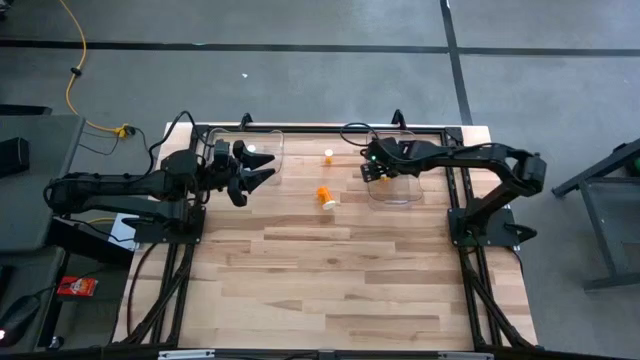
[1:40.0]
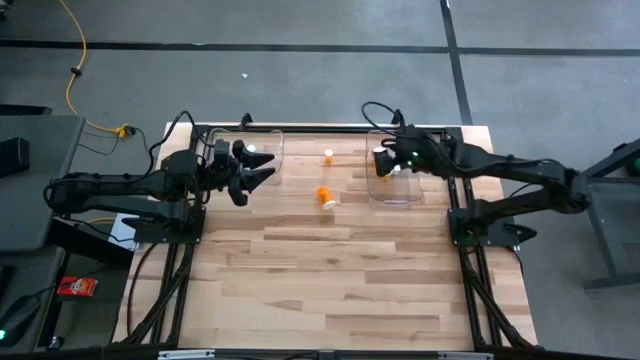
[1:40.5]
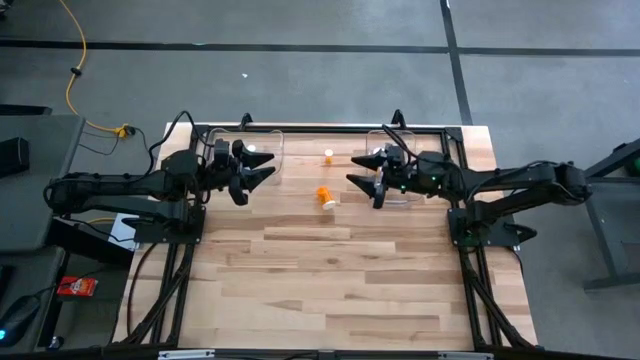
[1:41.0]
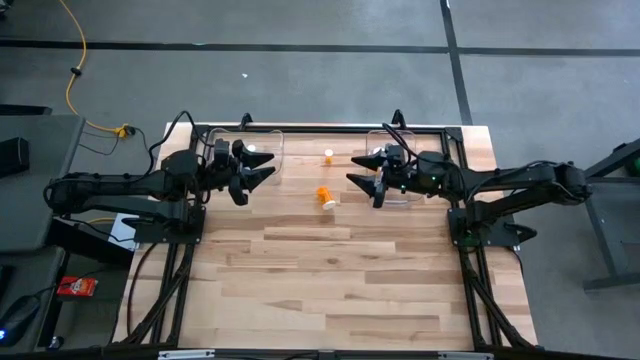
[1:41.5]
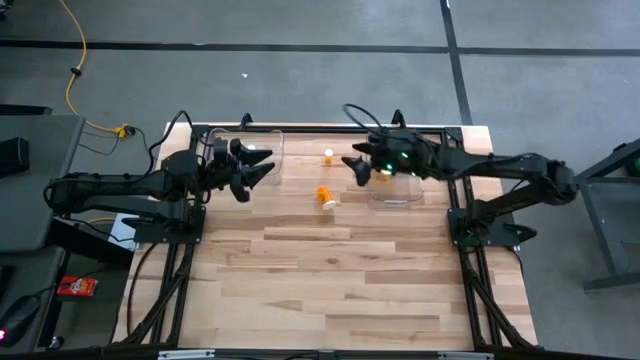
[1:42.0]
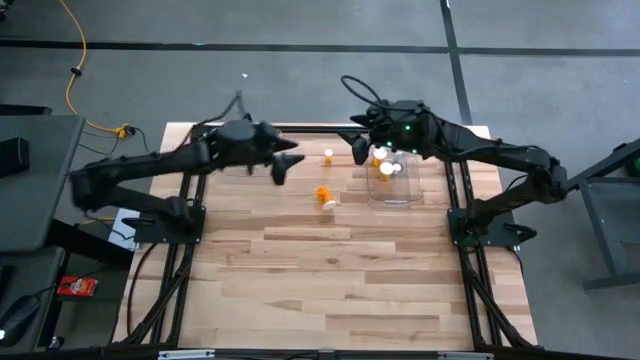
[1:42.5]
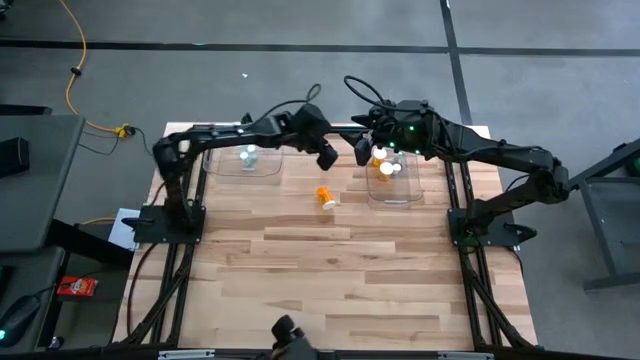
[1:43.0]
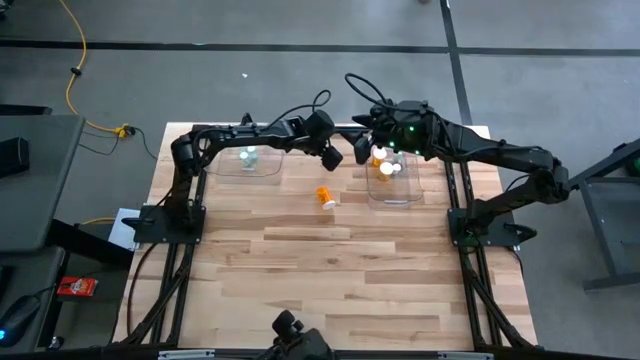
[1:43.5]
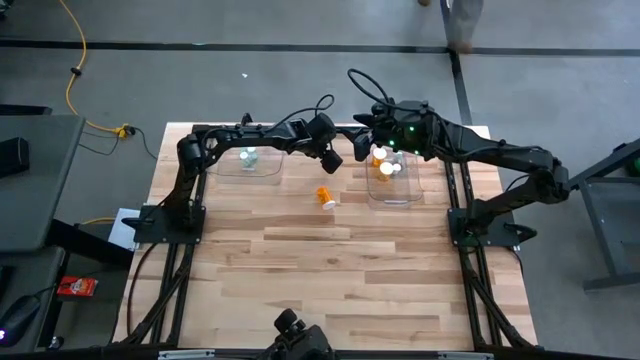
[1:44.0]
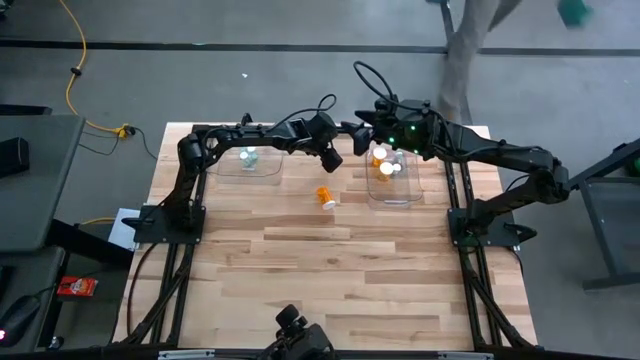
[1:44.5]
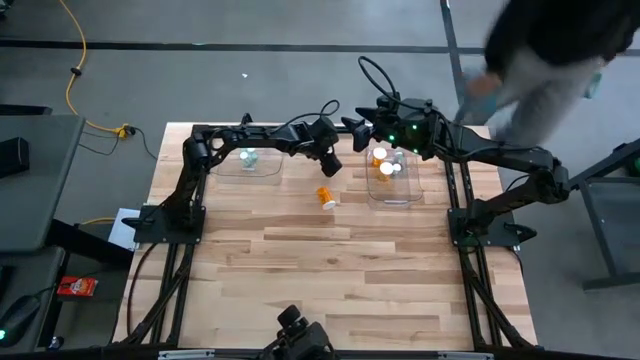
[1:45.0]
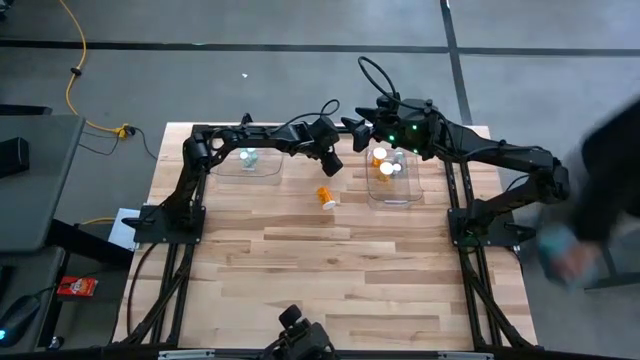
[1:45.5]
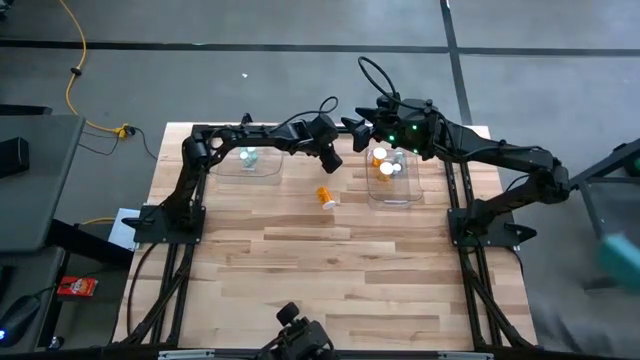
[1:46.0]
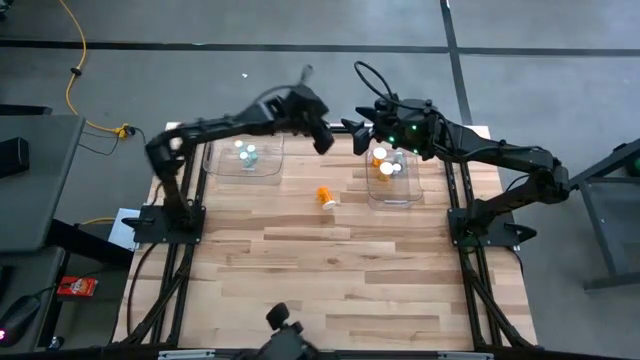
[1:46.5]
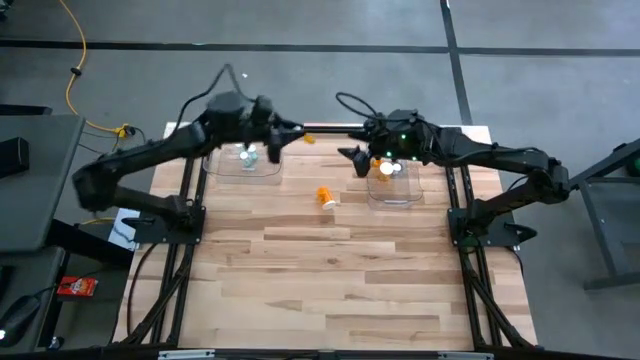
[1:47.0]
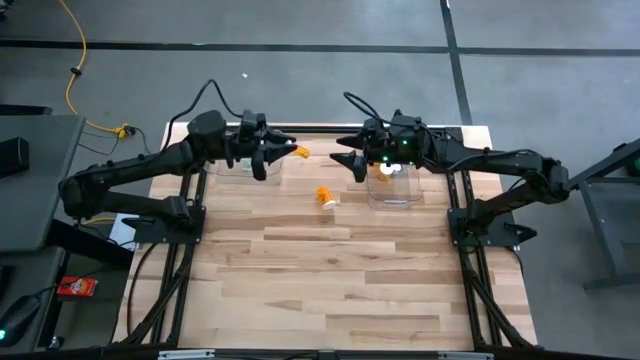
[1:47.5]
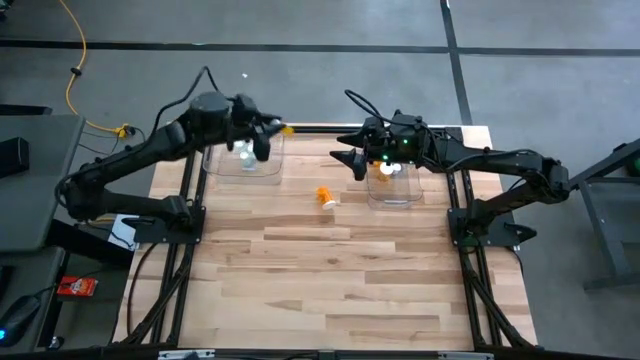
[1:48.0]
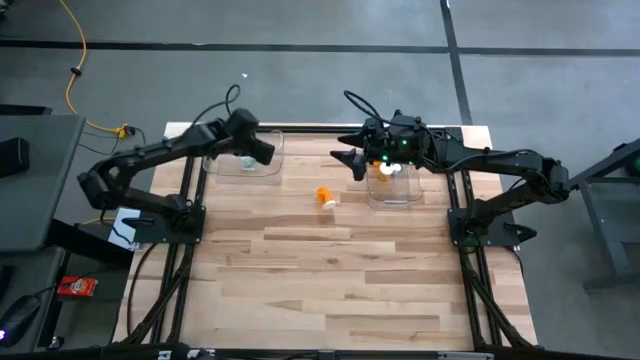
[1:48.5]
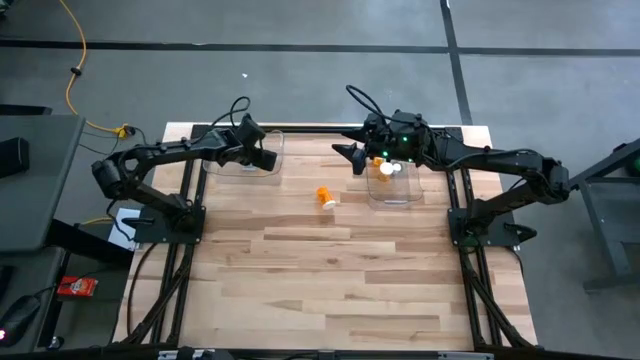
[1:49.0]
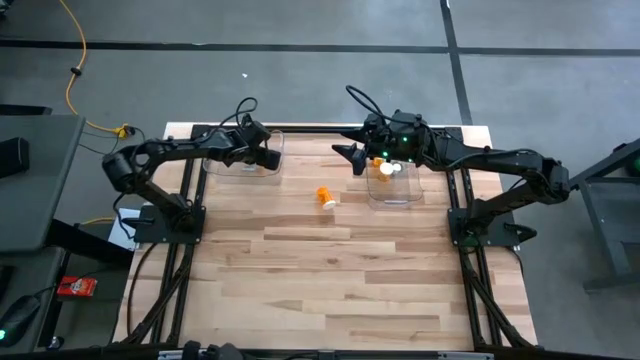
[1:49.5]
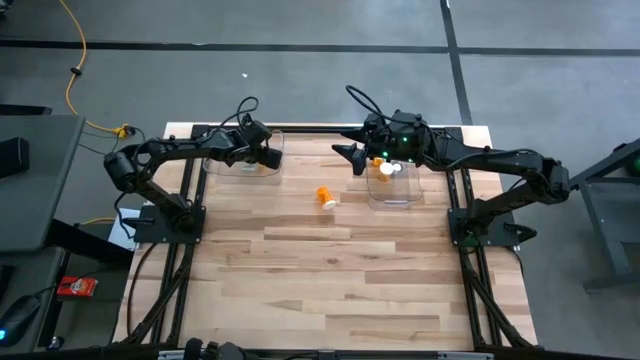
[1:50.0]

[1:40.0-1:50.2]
Task: Pick and place medicine bottles into bin by pill shape (circle, oval)
Put the orange tablet bottle into the left transparent bin

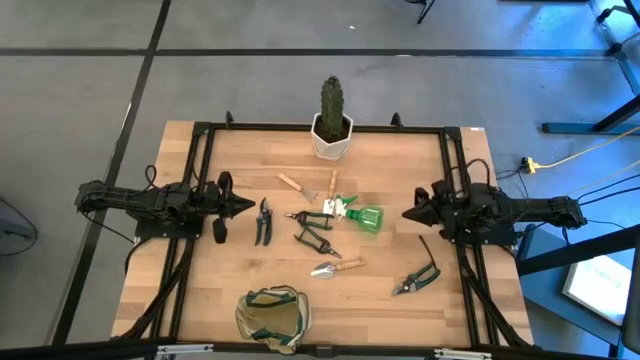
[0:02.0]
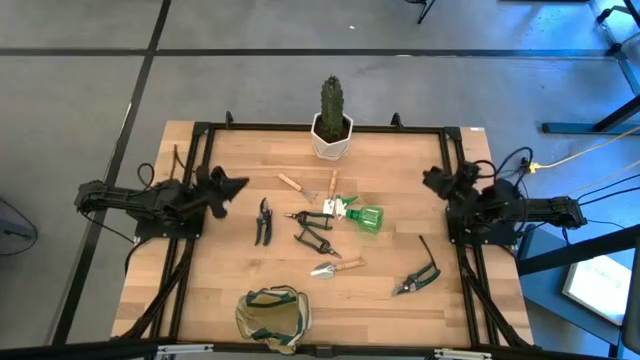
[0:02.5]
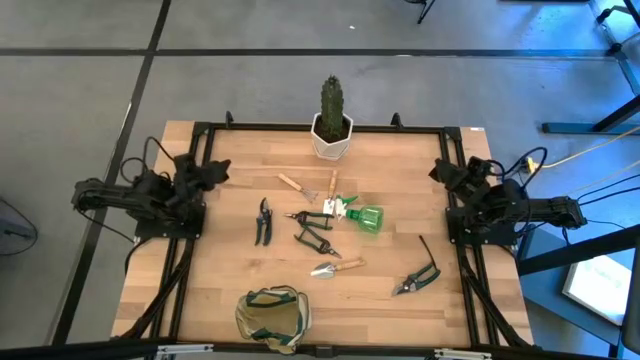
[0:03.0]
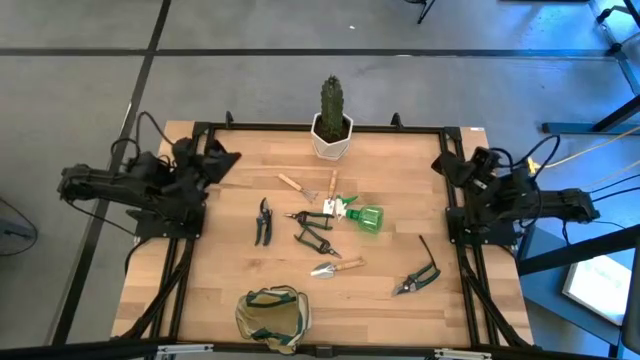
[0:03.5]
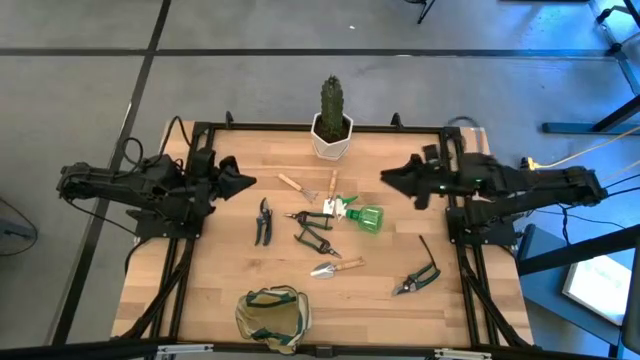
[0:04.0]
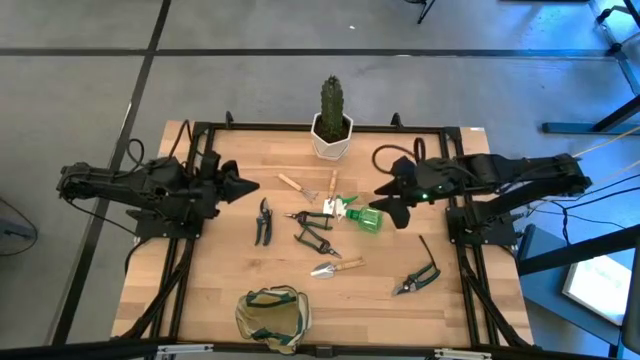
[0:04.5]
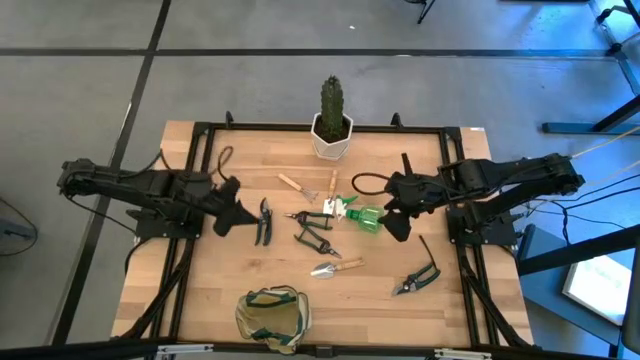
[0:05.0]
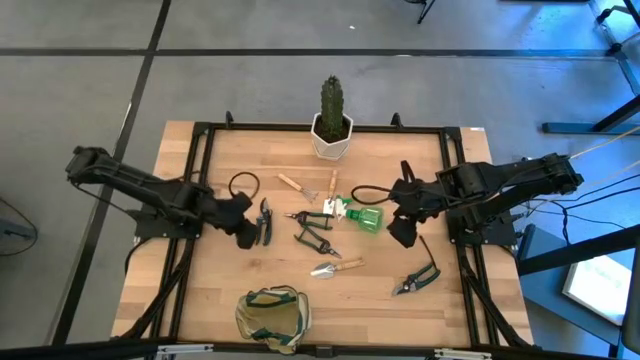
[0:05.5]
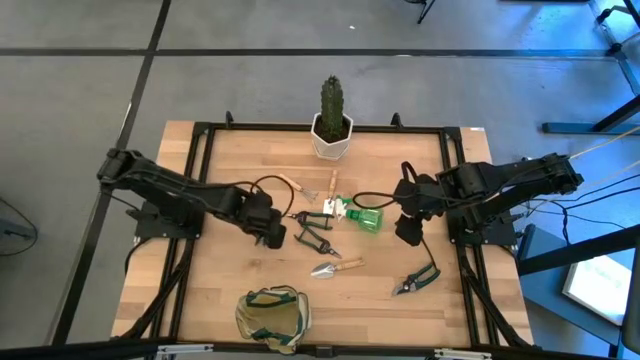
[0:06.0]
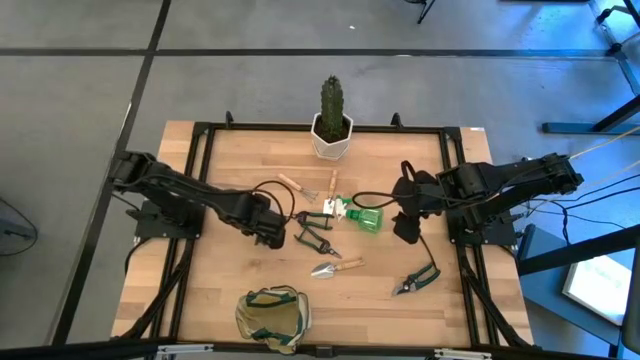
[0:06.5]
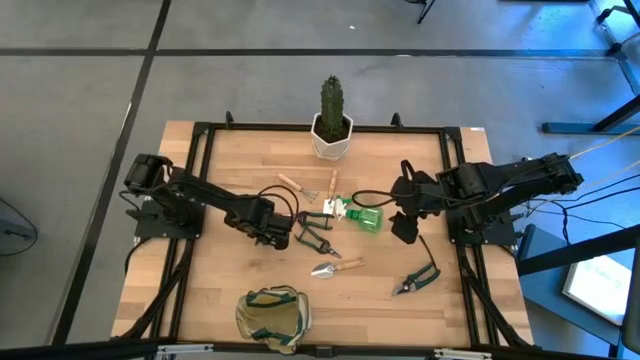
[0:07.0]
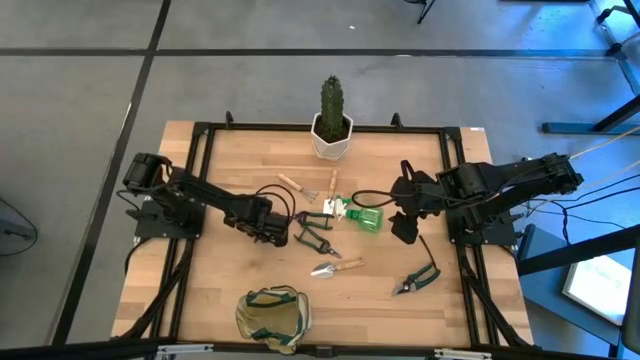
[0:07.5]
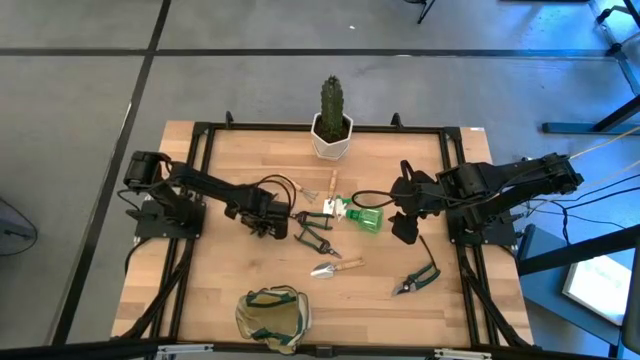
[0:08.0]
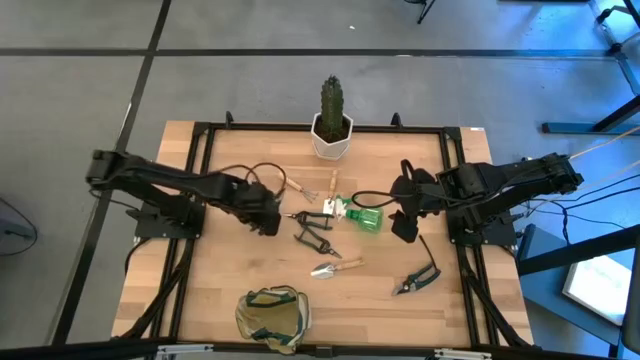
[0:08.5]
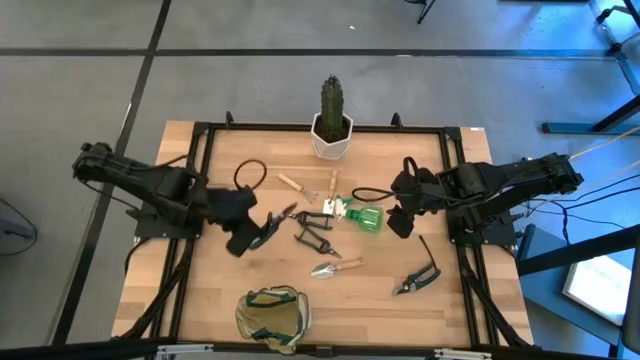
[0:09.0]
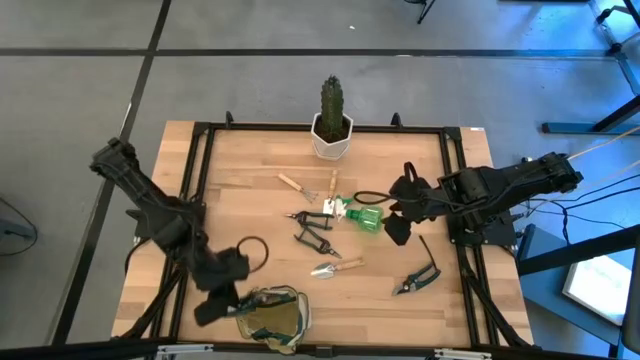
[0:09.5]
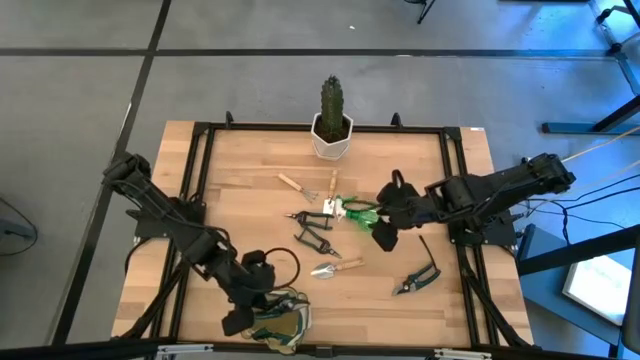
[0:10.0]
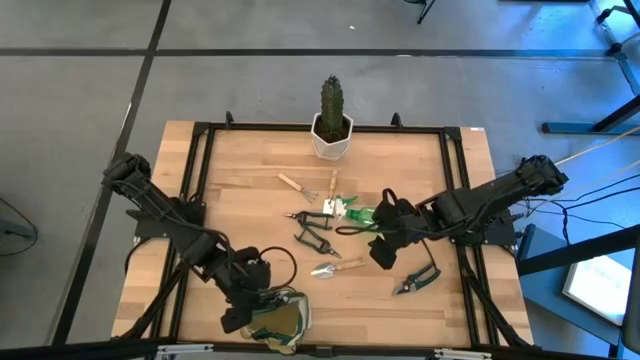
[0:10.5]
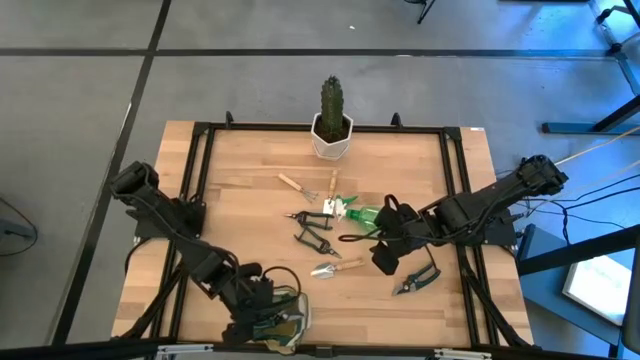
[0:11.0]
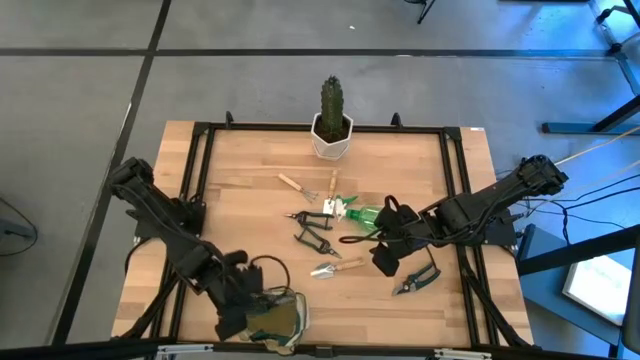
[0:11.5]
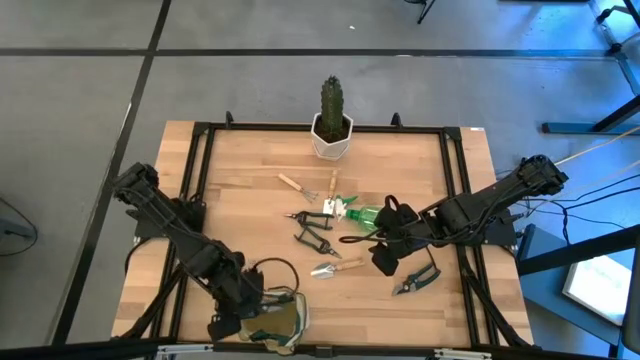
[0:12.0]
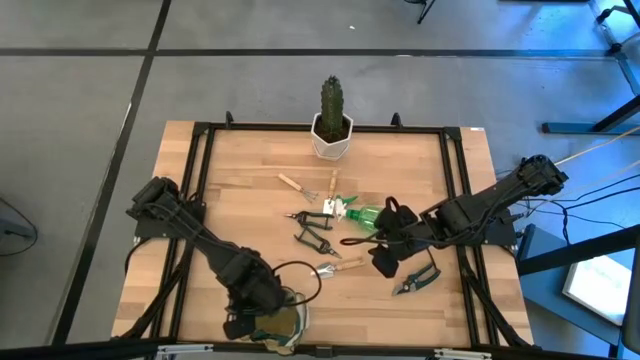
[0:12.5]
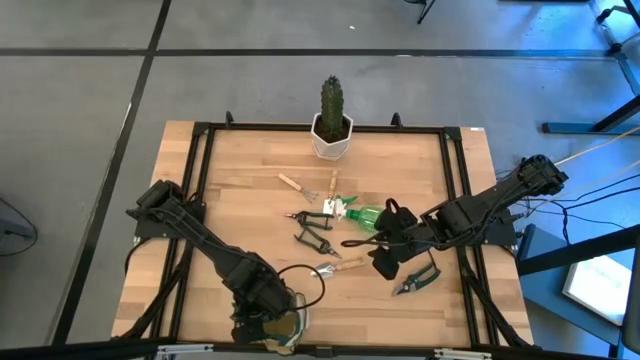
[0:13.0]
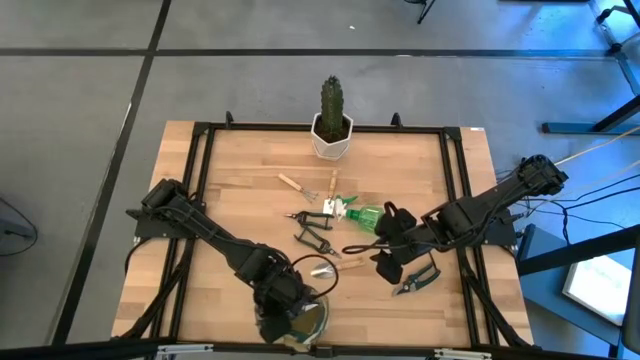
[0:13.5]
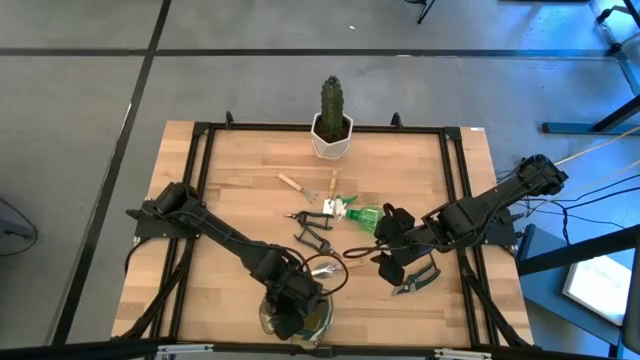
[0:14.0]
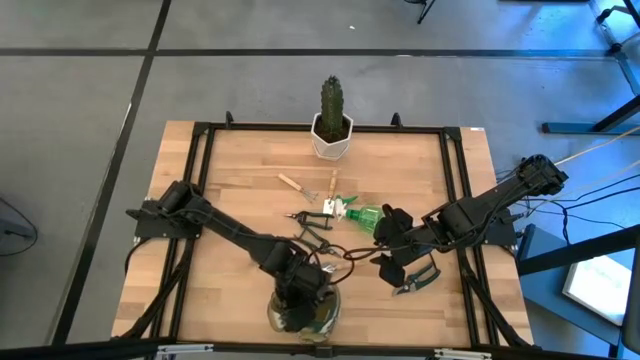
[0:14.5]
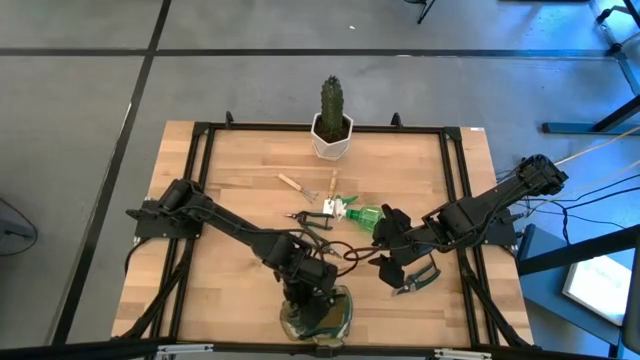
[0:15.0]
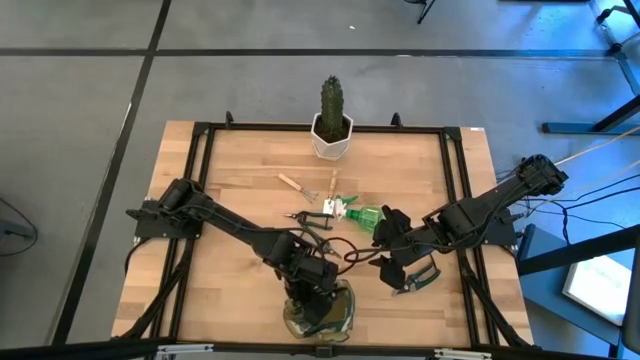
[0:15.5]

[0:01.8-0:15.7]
Task: Pick & Place Garden tools in Gardening bag
Put the shear scissors into the gardening bag
